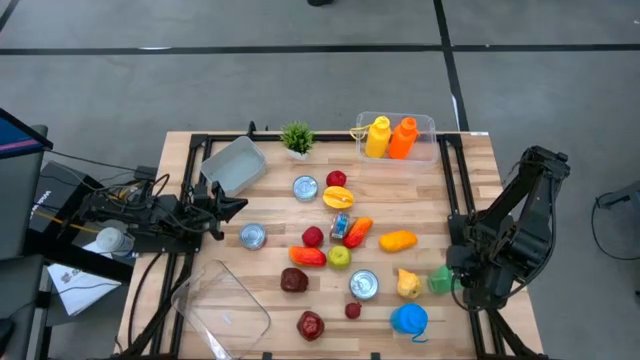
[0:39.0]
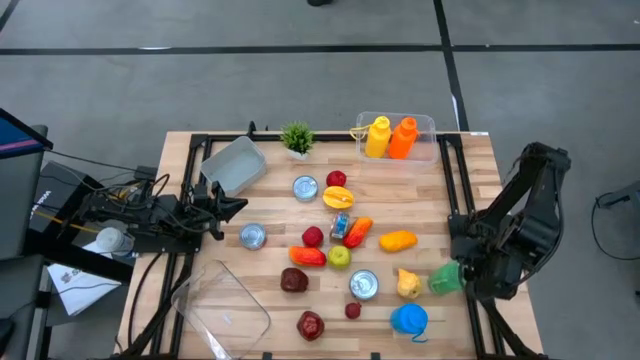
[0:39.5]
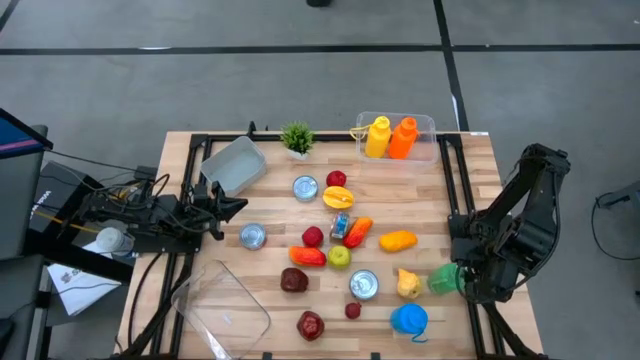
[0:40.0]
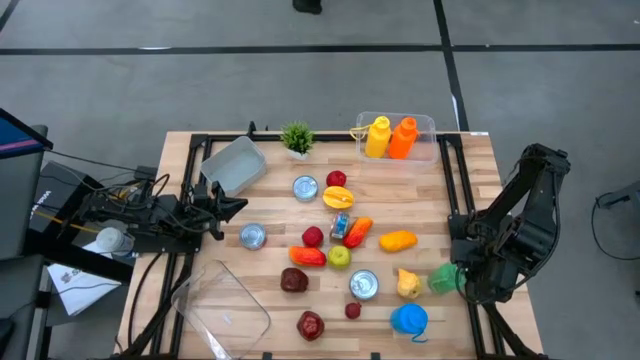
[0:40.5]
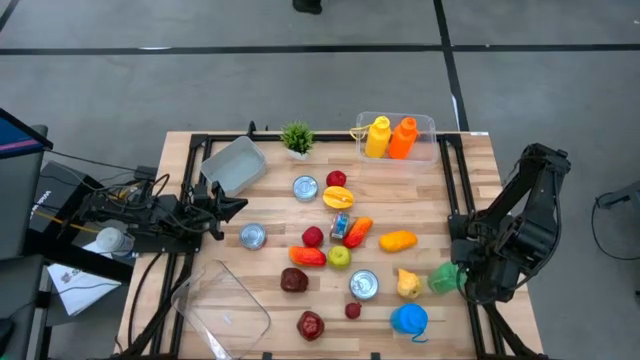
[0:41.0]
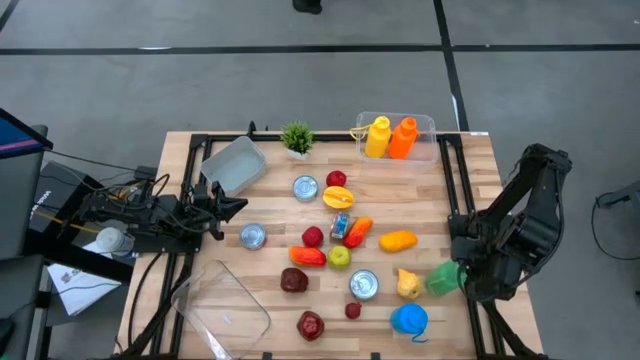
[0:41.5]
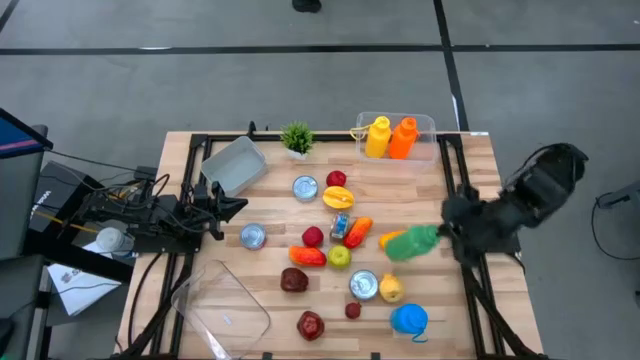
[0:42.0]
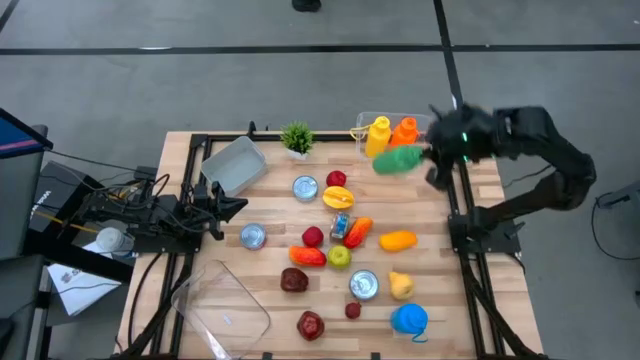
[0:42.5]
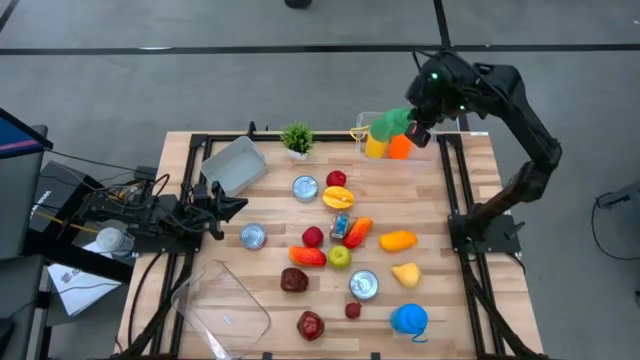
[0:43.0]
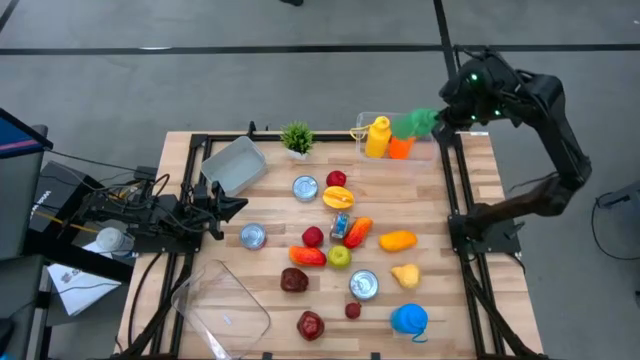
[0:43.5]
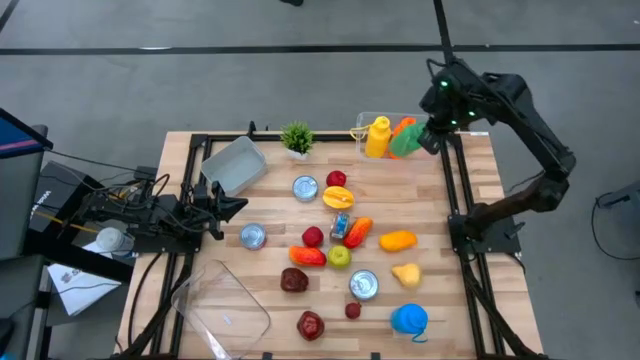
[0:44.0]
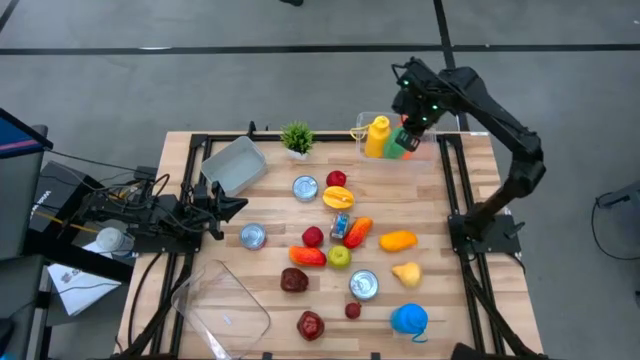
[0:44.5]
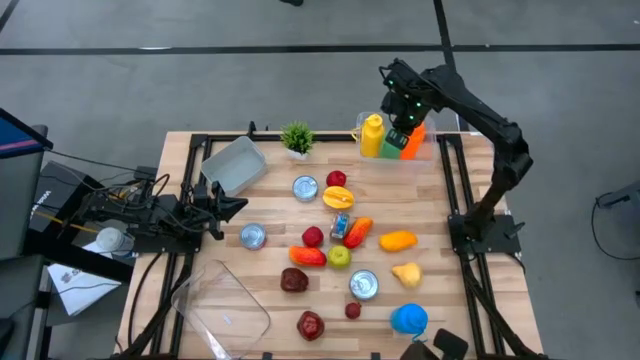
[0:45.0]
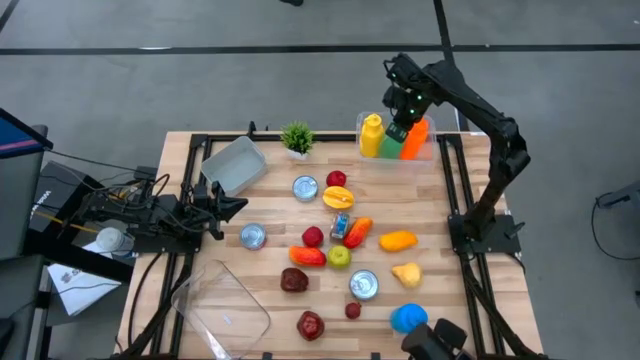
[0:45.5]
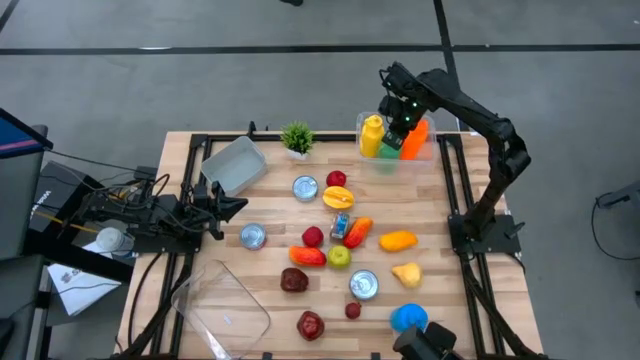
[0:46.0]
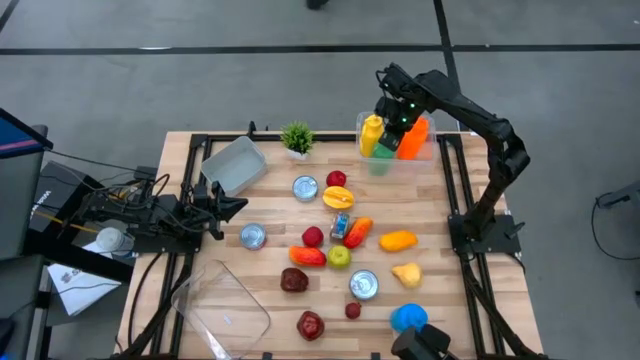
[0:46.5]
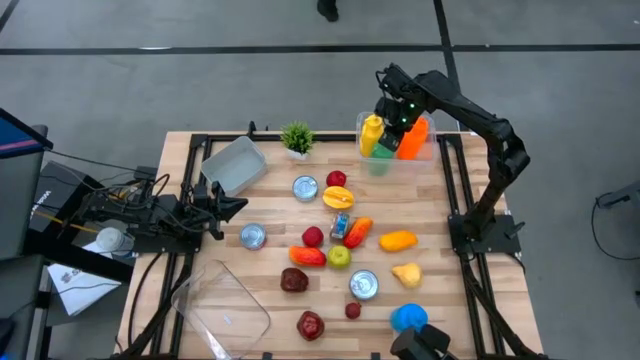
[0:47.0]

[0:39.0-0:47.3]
Task: Pick & Place Food Item
Put the green tumbler into the top transparent bin

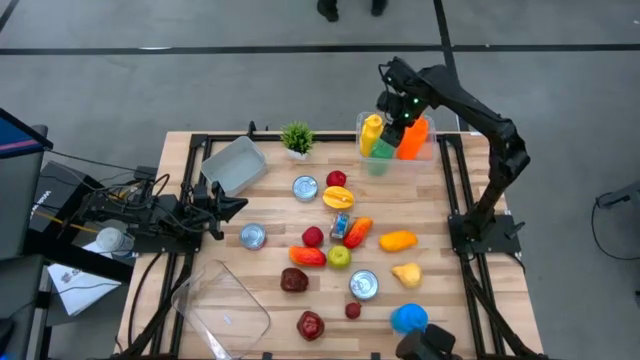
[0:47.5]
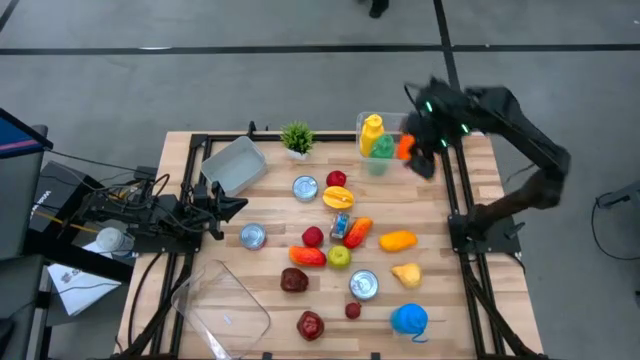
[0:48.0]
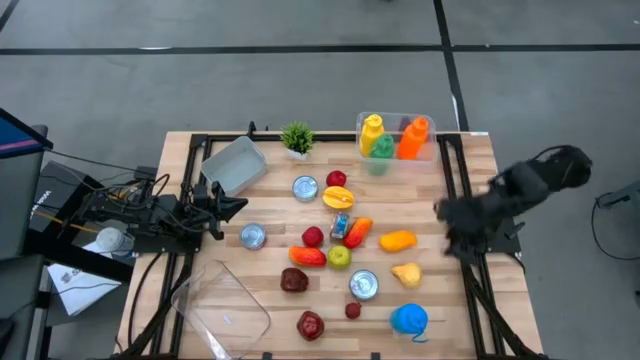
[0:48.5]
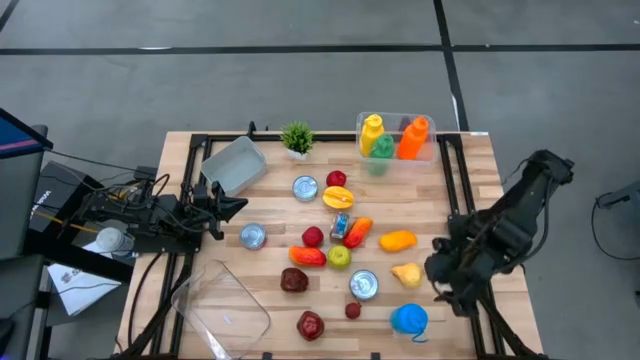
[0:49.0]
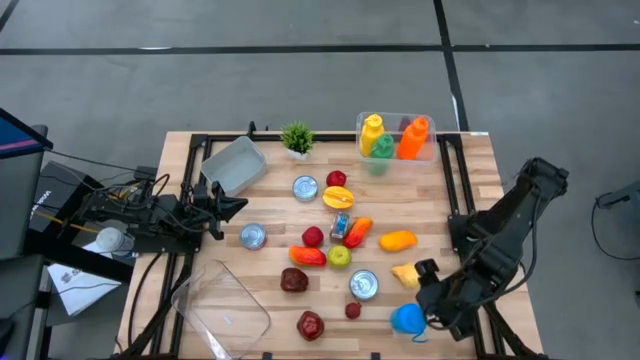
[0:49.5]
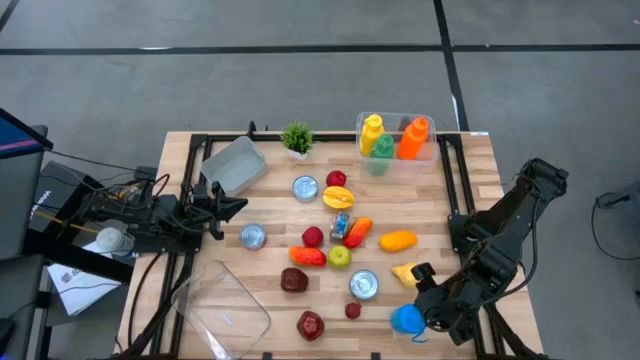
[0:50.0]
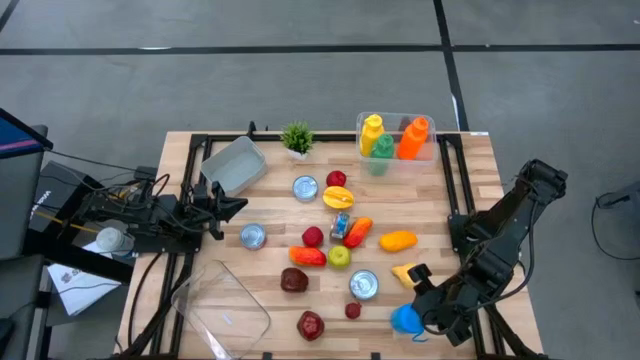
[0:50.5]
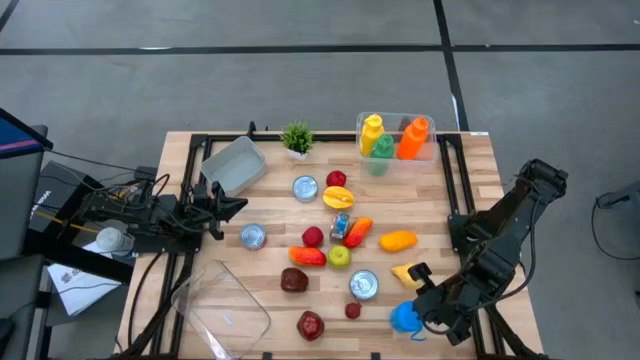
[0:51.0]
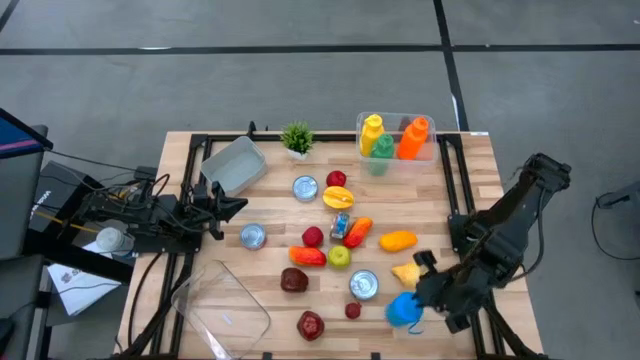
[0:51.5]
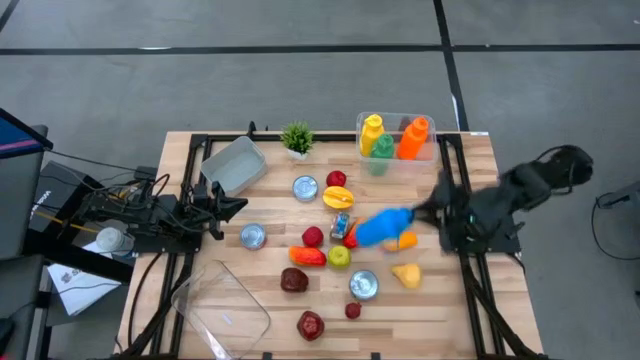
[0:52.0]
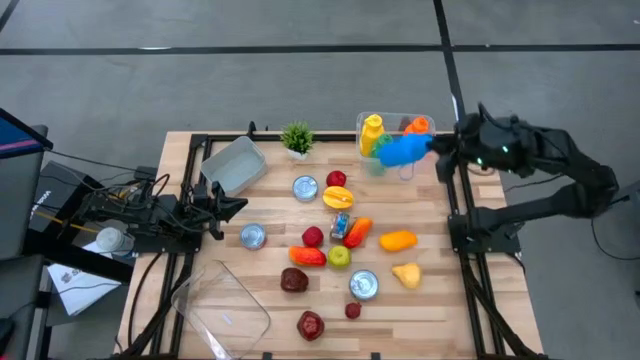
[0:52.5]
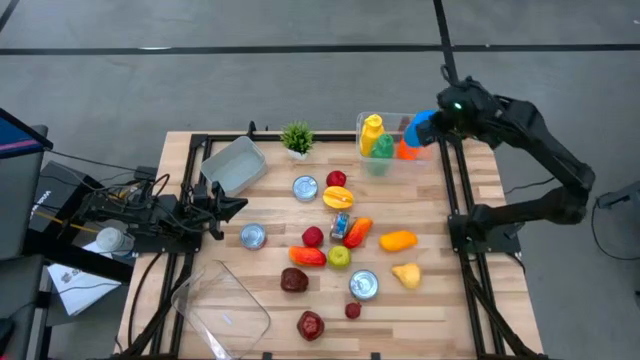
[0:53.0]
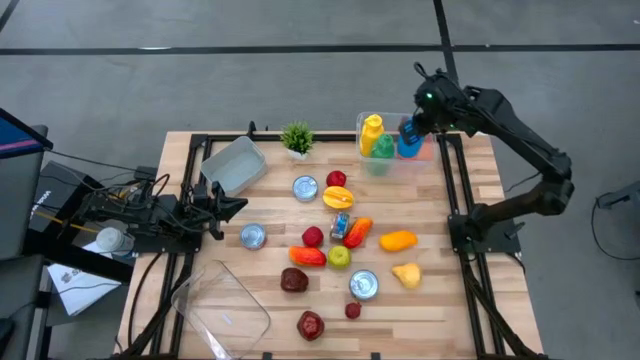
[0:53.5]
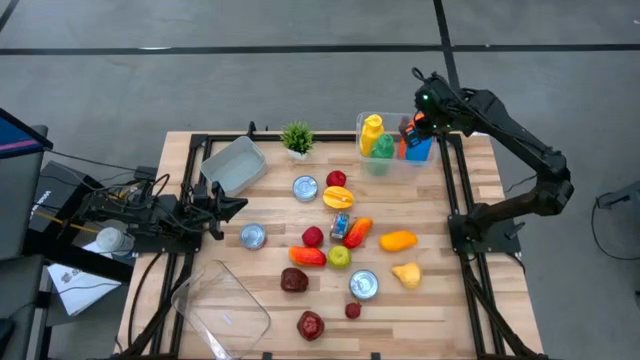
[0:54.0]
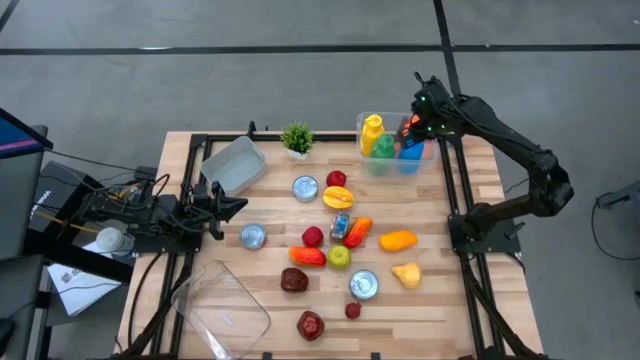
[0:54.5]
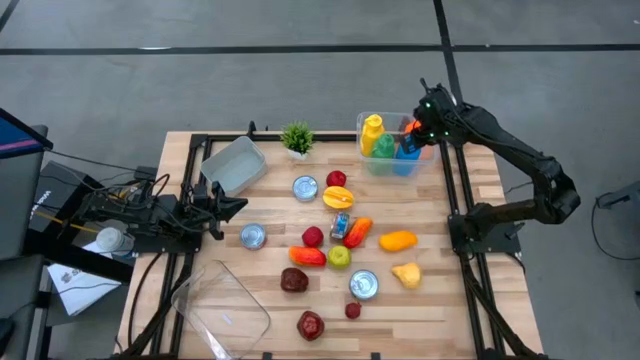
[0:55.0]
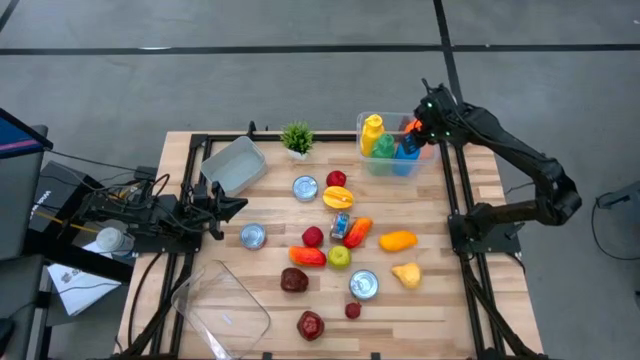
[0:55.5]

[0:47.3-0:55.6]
Put the blue tumbler into the top transparent bin
